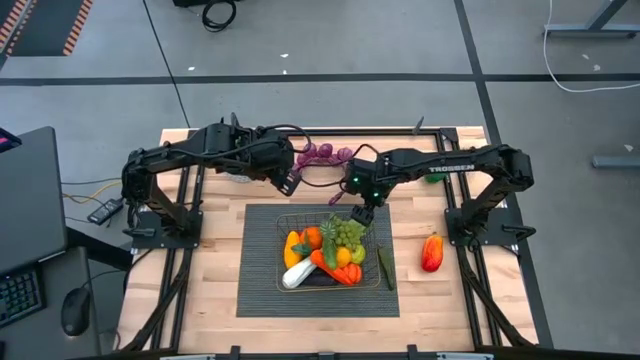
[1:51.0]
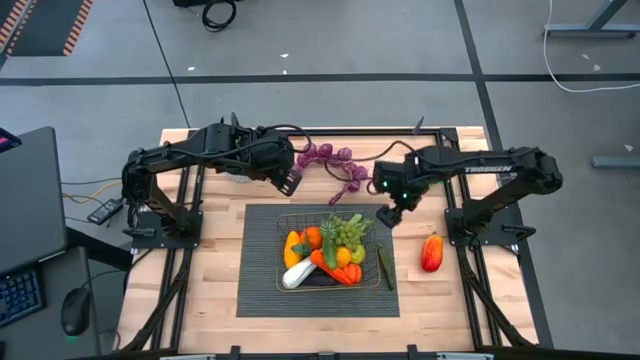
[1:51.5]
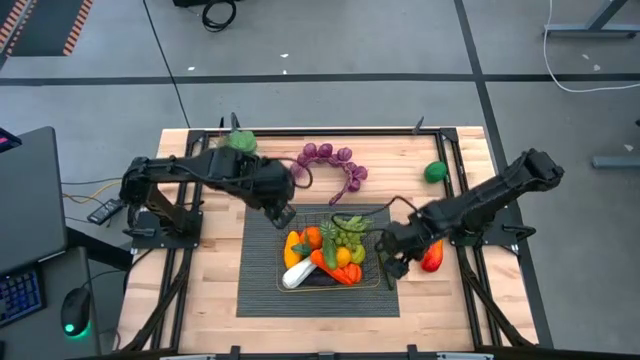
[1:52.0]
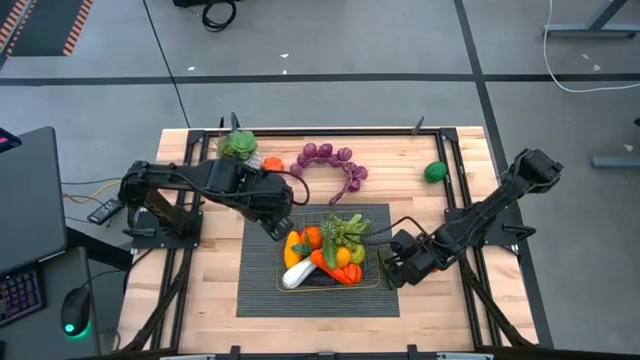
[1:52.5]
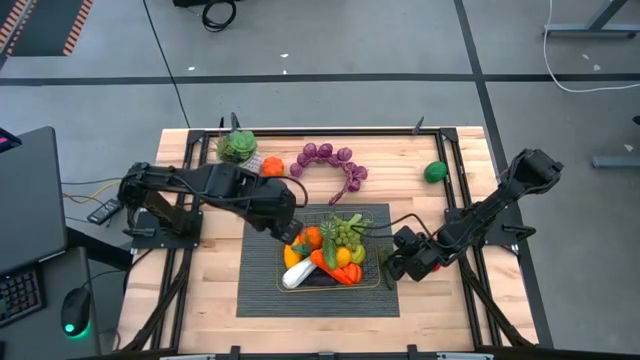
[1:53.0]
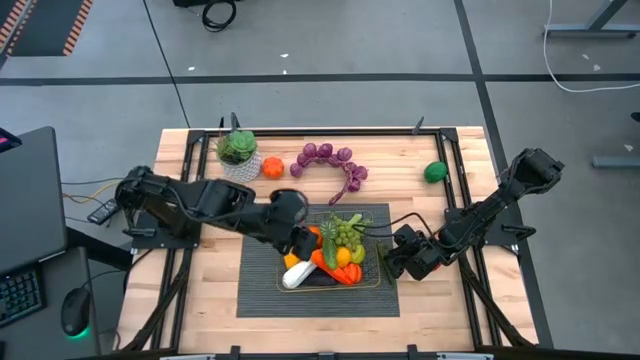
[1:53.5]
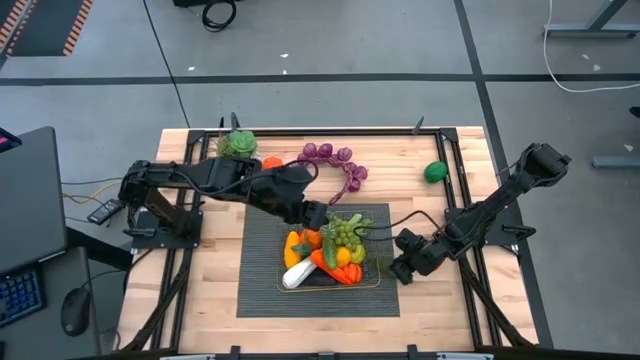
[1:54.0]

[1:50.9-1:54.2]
Task: Build produce basket
Put the green chili pepper into the gold wire basket

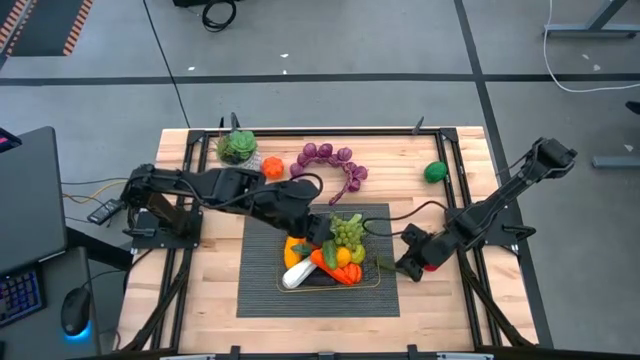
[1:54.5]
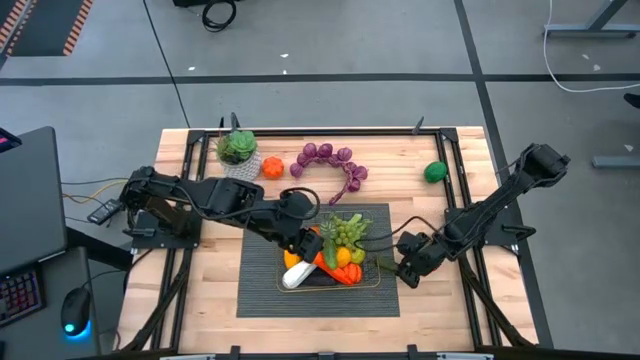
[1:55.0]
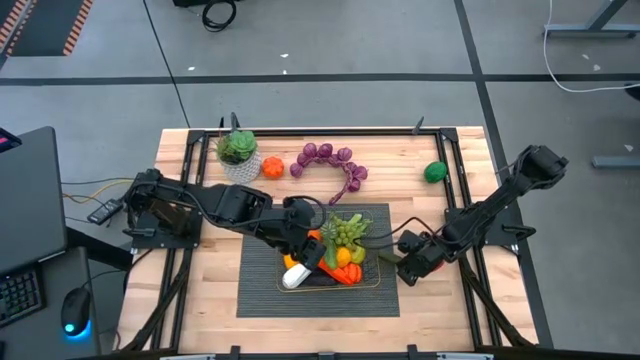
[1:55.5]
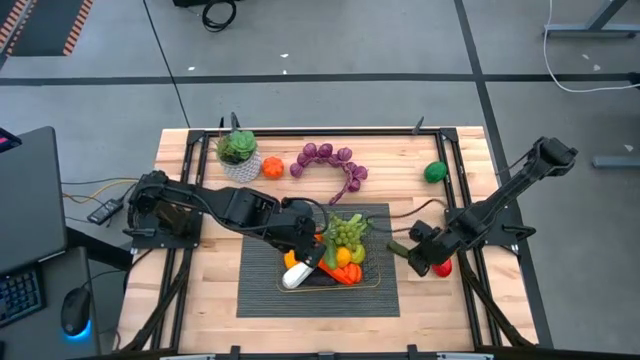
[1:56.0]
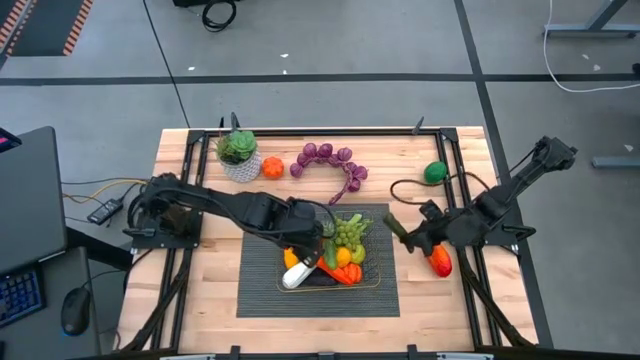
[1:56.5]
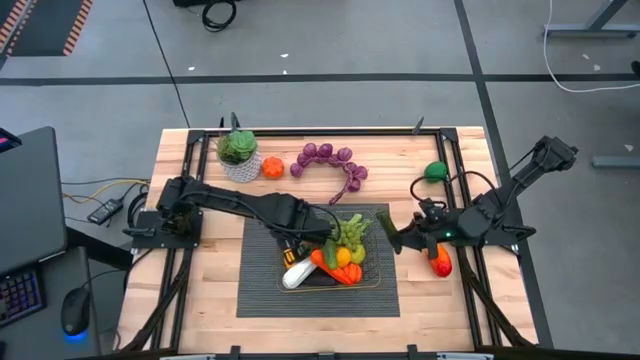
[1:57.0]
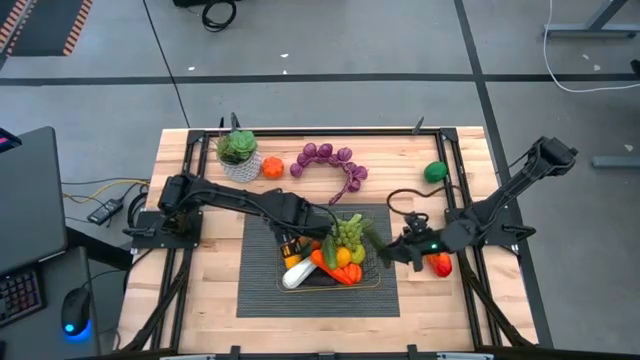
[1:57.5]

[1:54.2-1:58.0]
Put the green chili pepper into the gold wire basket

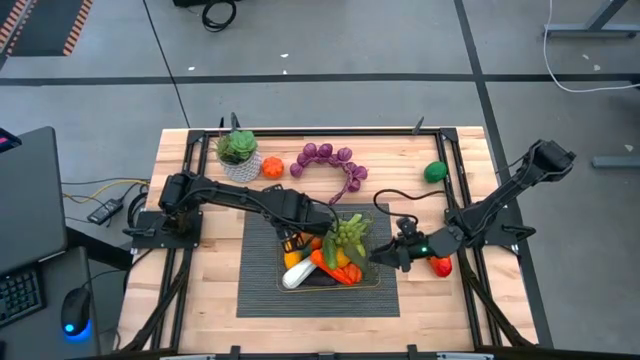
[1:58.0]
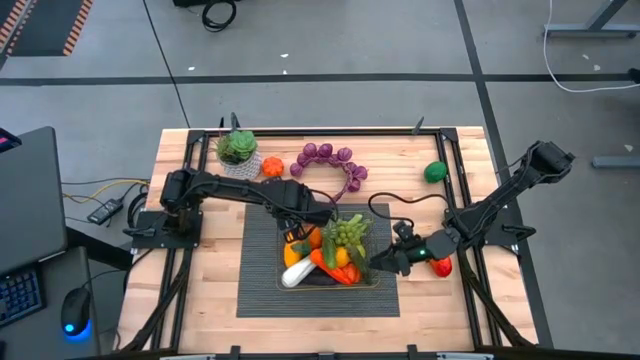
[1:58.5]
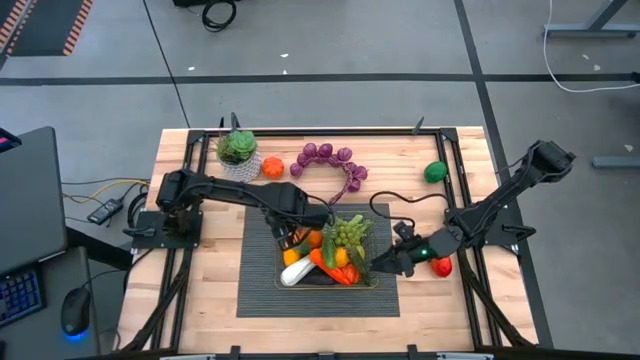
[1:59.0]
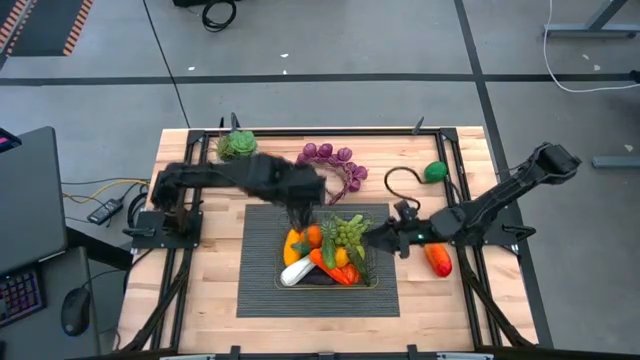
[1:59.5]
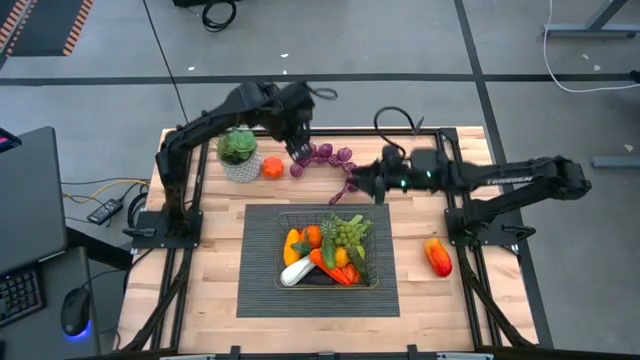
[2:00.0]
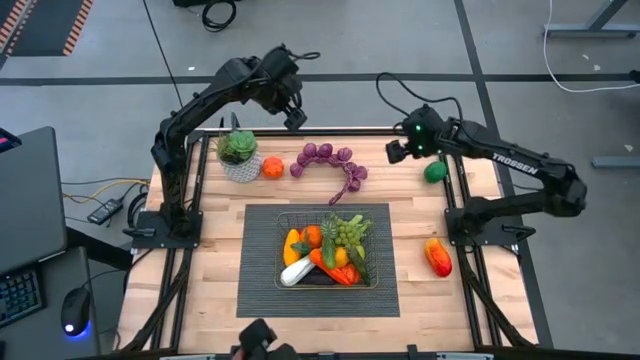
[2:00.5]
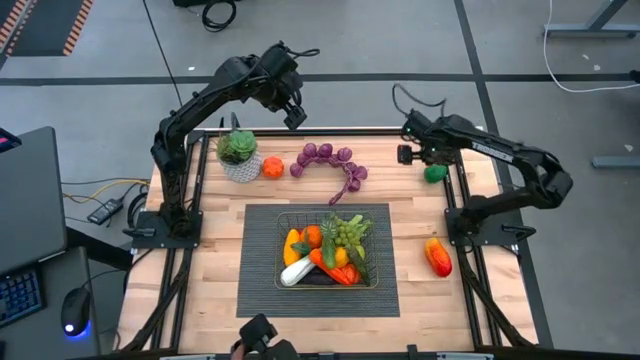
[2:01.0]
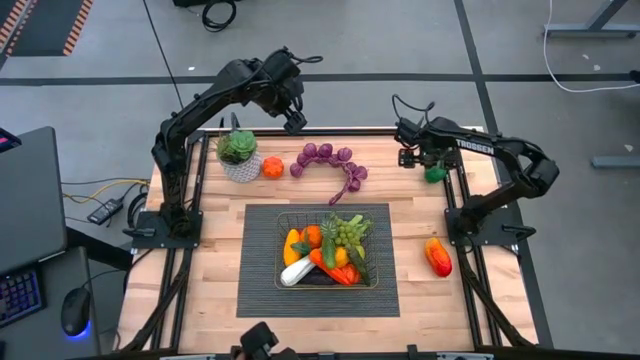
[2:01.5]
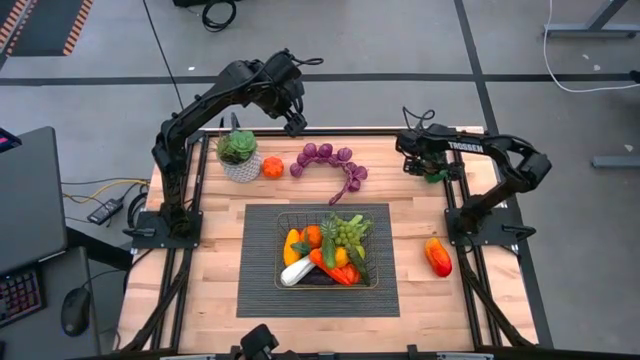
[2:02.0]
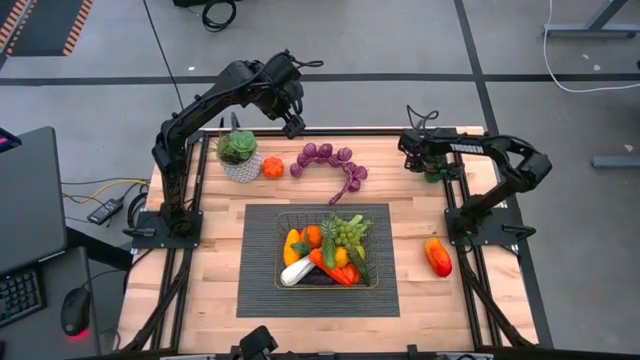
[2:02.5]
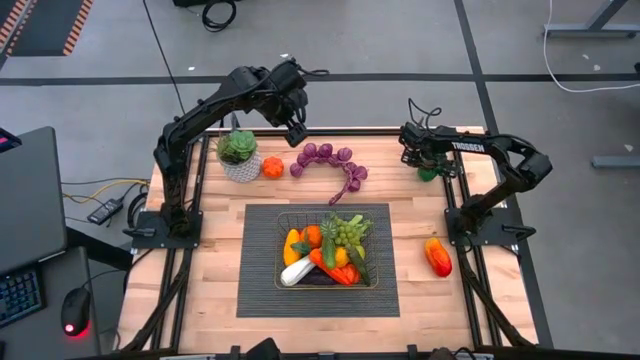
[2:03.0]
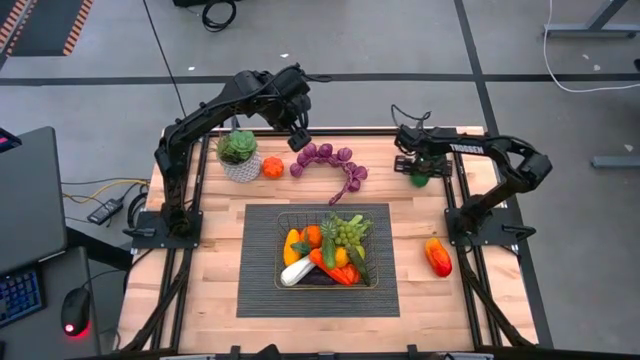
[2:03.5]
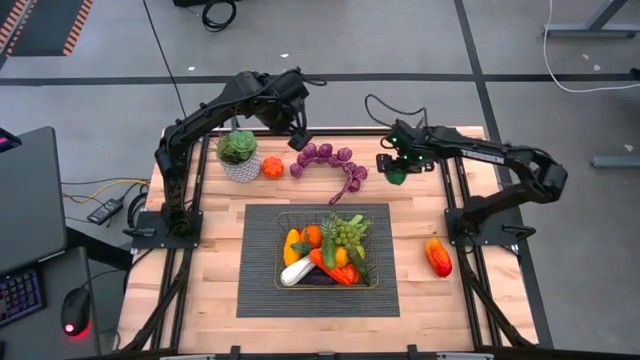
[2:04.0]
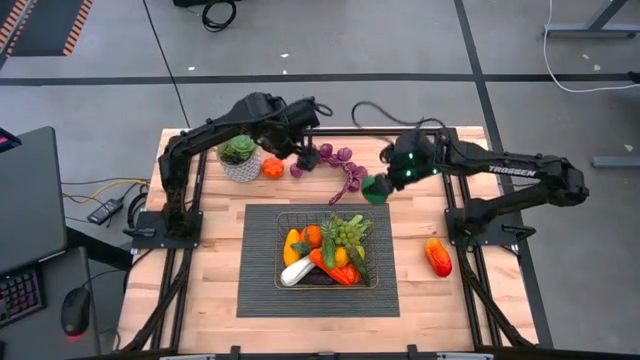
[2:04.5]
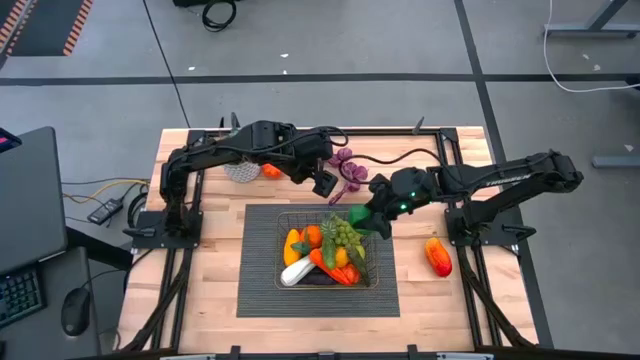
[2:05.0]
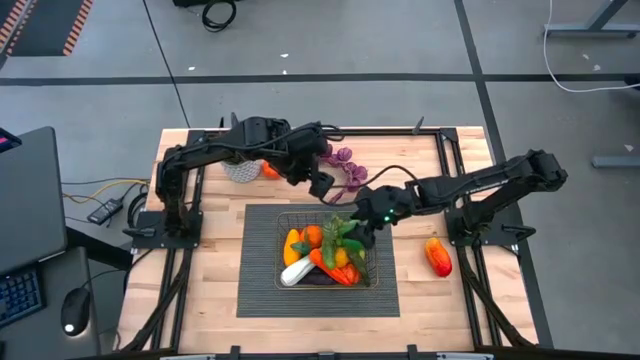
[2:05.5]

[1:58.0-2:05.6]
Put the green lime into the gold wire basket

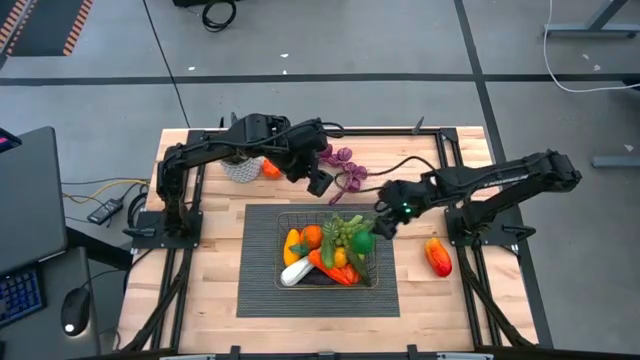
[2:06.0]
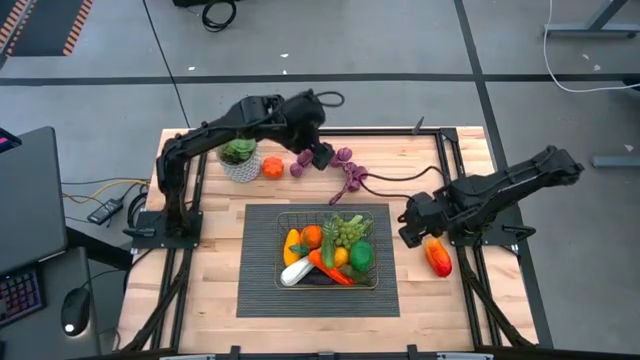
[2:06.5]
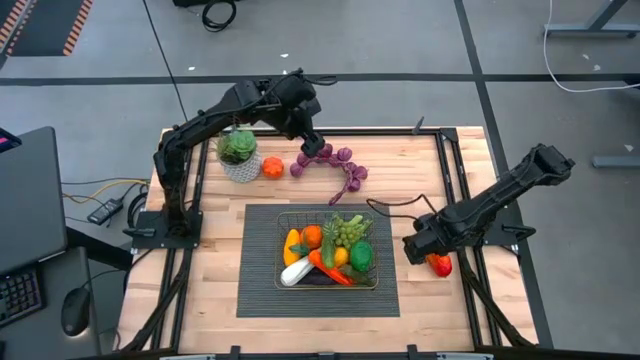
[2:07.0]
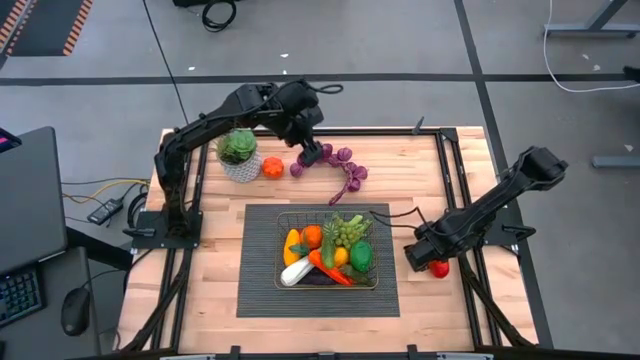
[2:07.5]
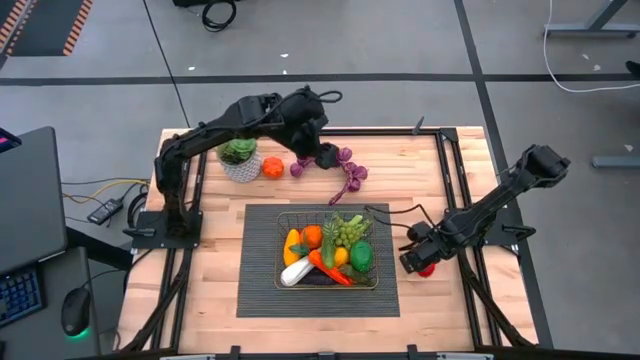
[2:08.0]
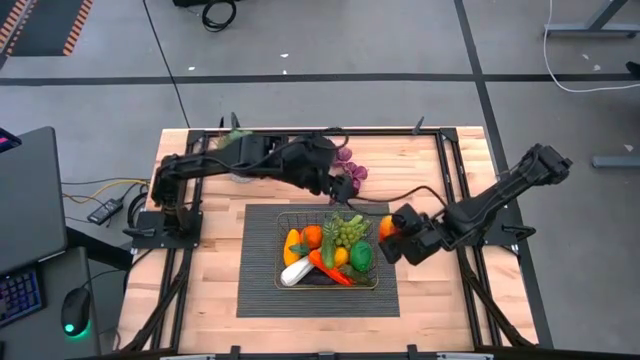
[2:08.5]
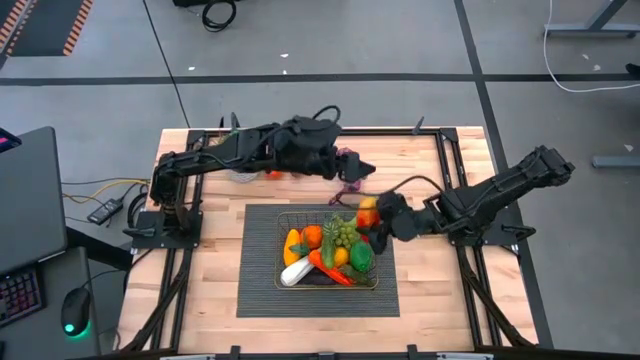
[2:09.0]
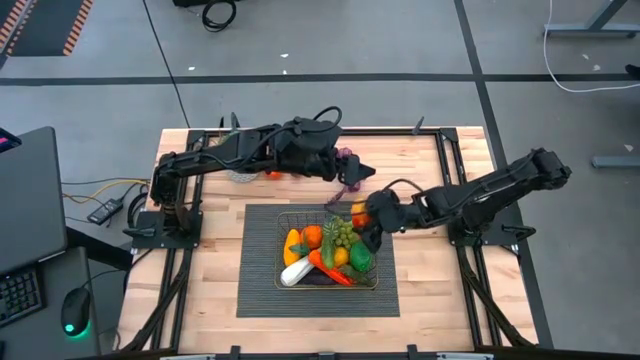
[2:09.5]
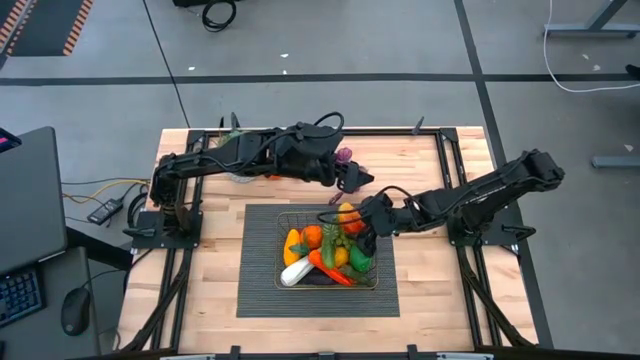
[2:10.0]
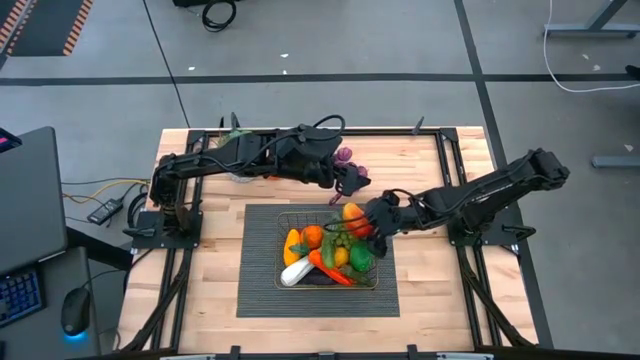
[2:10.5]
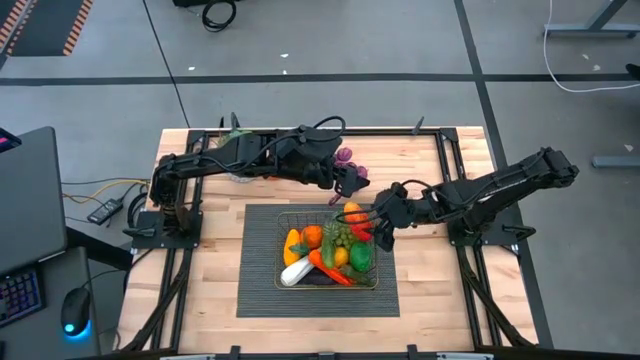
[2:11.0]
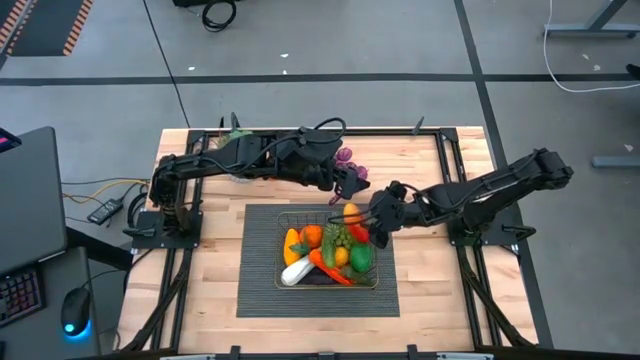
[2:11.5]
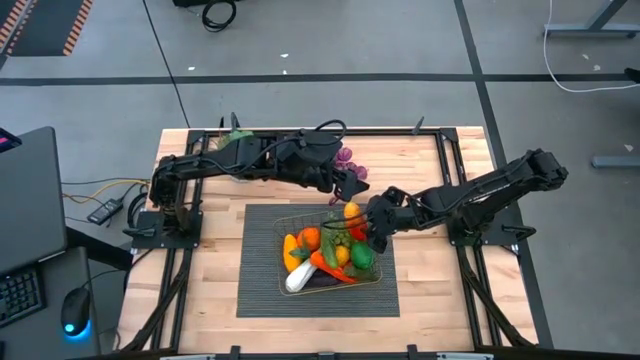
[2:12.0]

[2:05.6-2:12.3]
Put the orange mango into the gold wire basket
